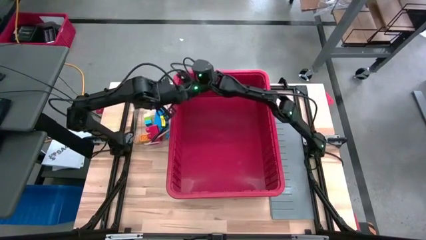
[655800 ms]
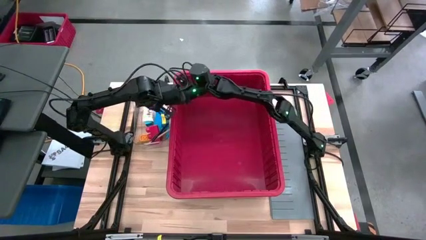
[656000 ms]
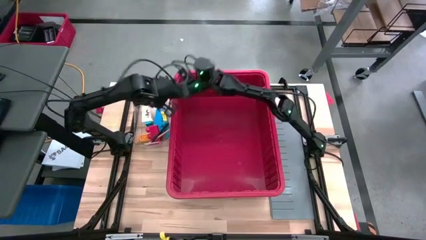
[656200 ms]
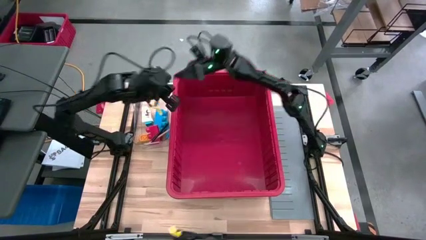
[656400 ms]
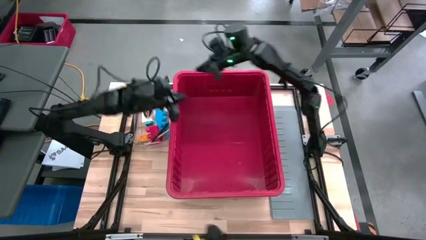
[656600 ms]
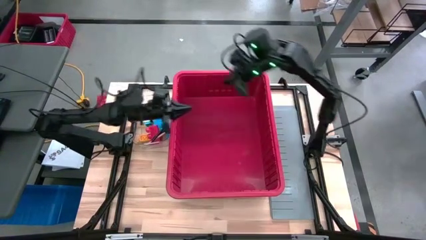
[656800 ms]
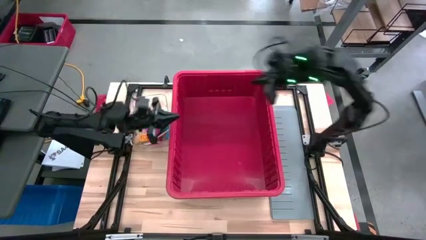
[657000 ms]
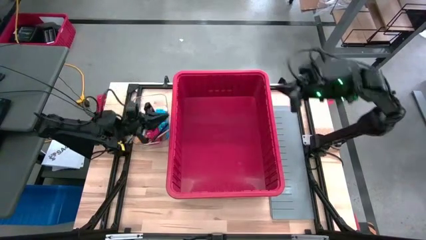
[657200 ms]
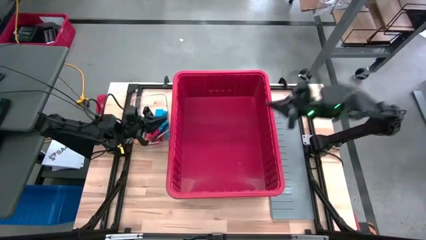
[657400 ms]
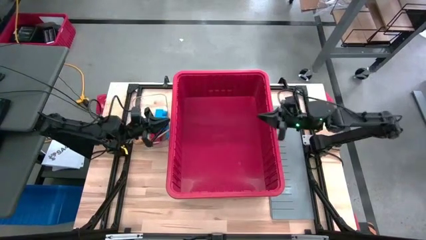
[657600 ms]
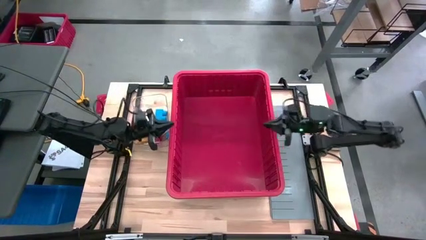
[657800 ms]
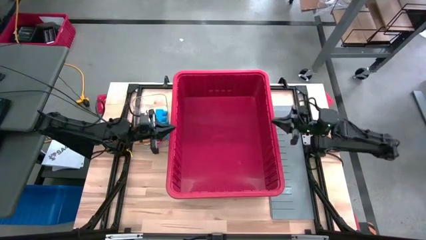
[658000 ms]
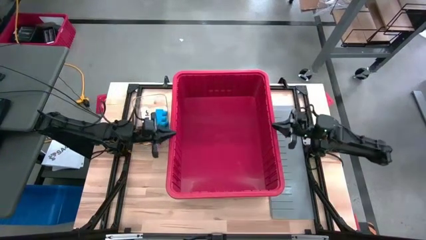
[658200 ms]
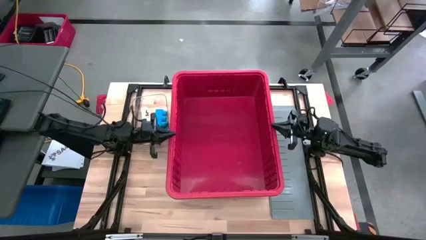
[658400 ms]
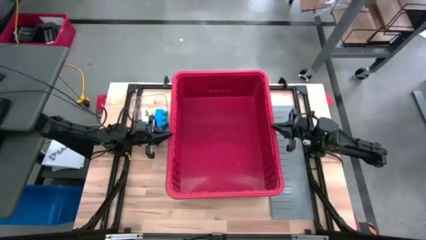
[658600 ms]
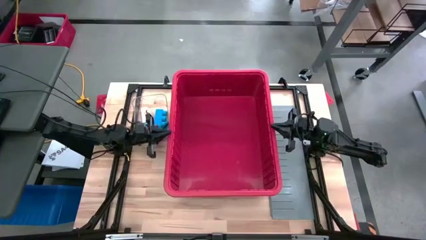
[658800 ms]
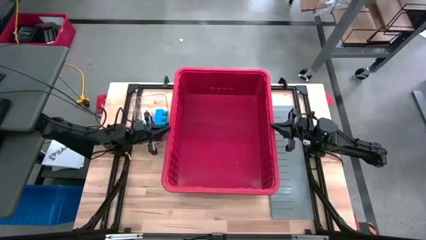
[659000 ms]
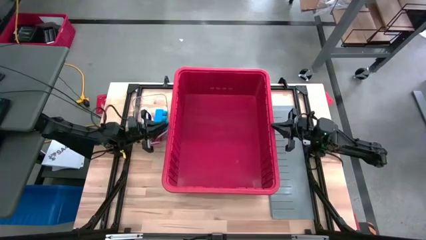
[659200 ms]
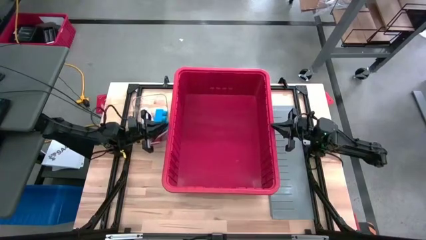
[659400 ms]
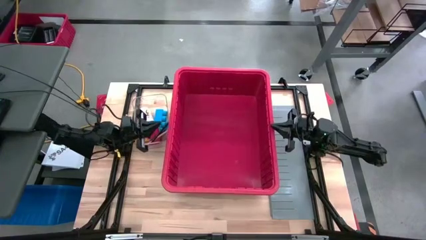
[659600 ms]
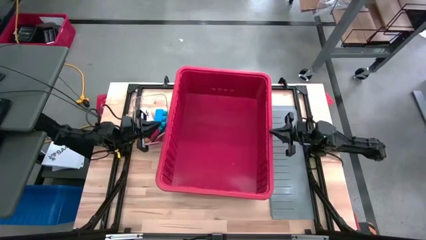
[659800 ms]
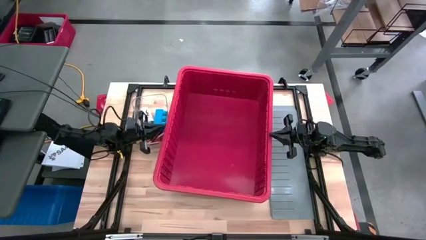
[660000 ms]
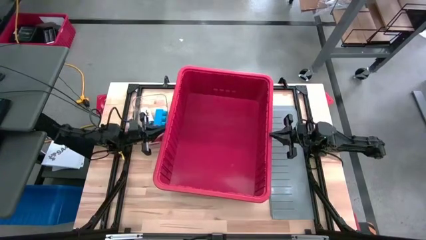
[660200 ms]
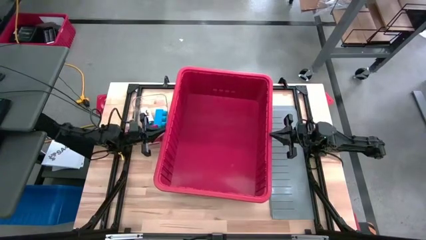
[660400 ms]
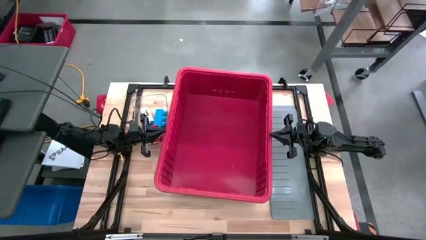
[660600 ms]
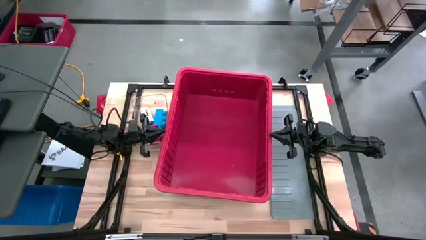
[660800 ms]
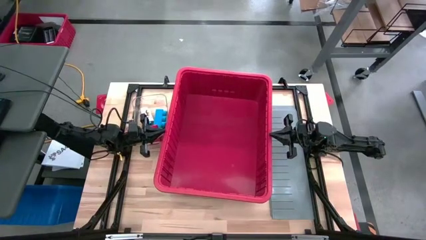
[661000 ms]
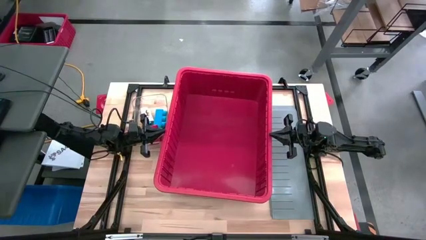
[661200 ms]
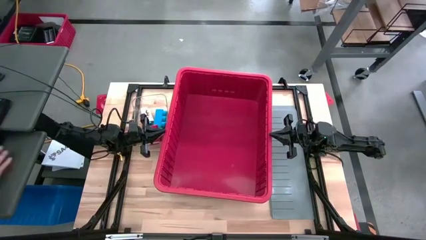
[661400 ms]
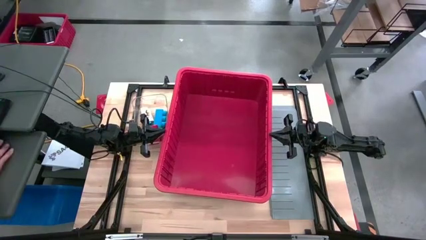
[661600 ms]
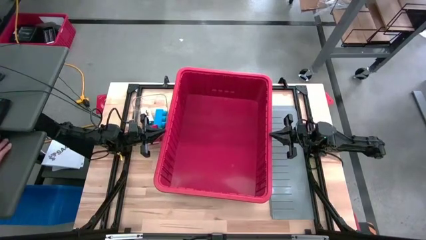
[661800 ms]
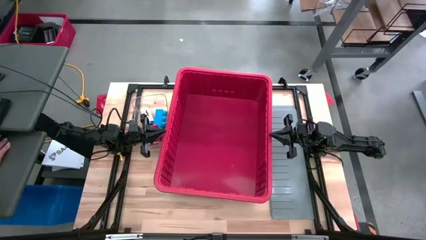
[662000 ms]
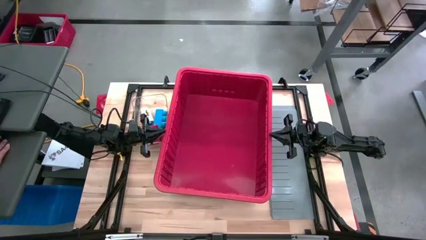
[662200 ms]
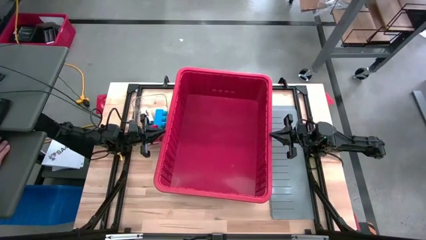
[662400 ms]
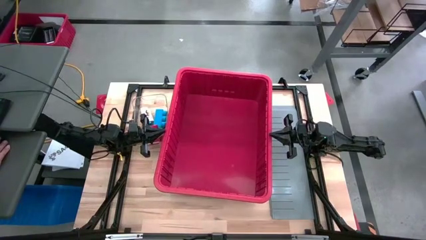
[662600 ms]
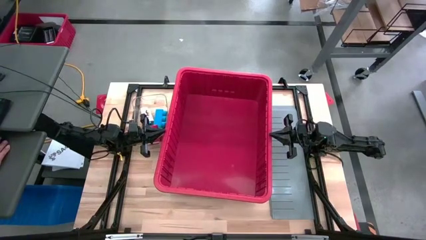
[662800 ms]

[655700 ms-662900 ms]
Task: Sort blocks
Return to Home Position

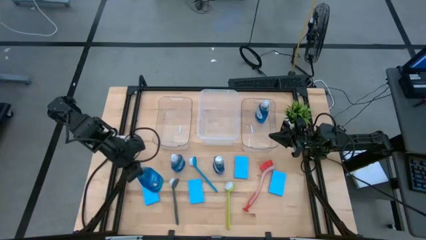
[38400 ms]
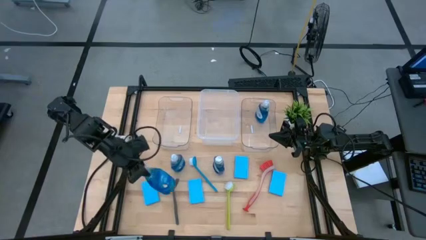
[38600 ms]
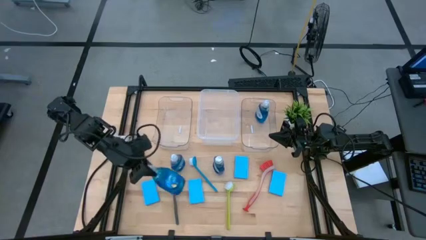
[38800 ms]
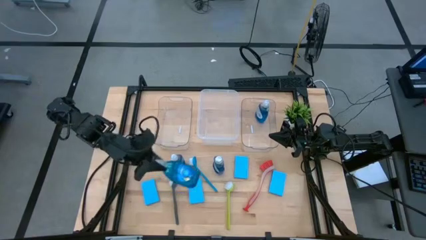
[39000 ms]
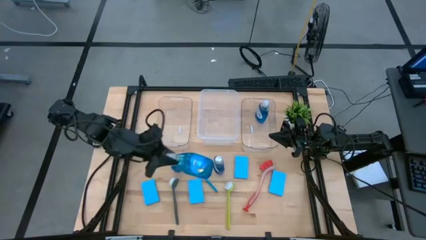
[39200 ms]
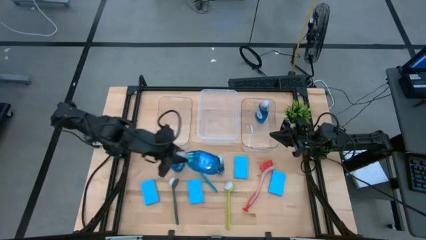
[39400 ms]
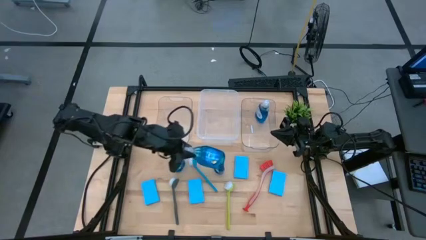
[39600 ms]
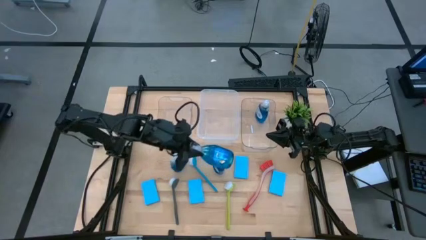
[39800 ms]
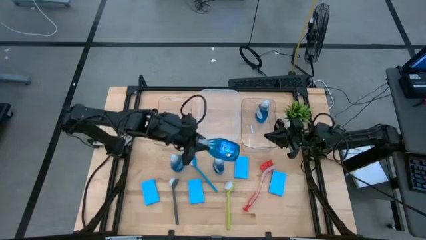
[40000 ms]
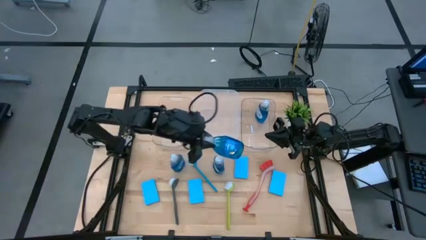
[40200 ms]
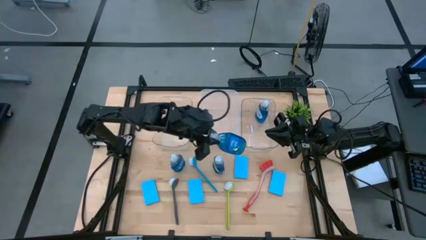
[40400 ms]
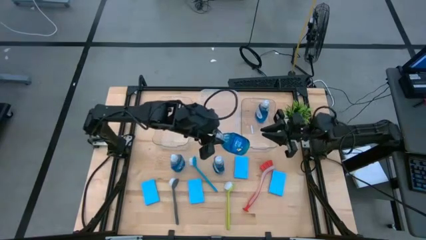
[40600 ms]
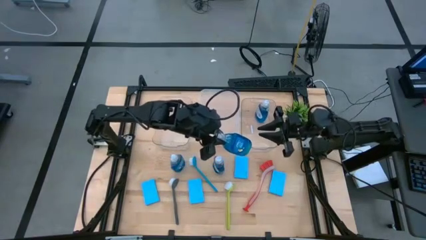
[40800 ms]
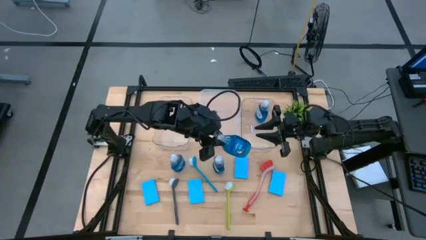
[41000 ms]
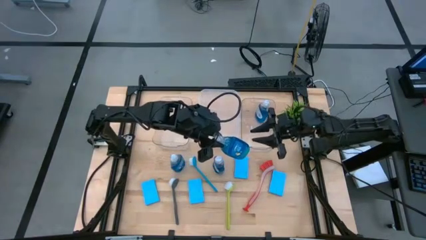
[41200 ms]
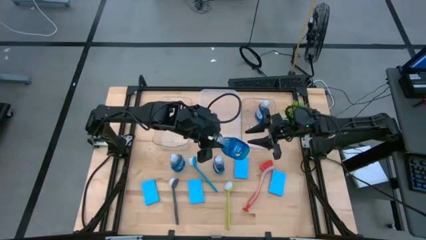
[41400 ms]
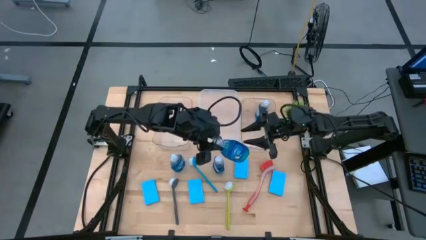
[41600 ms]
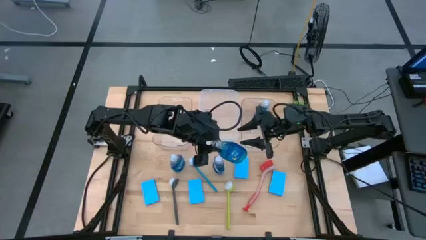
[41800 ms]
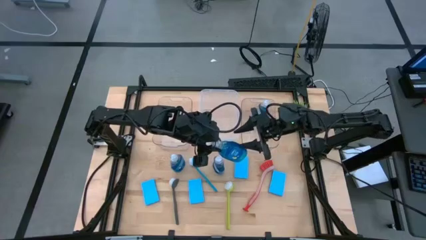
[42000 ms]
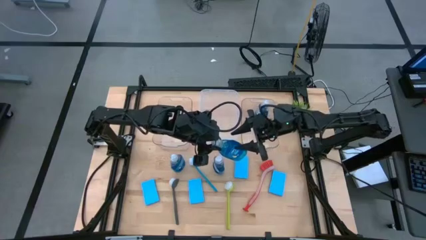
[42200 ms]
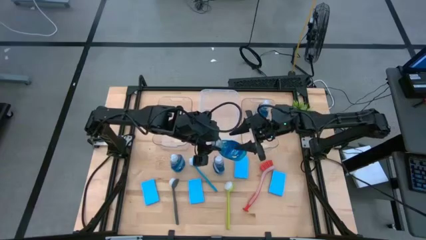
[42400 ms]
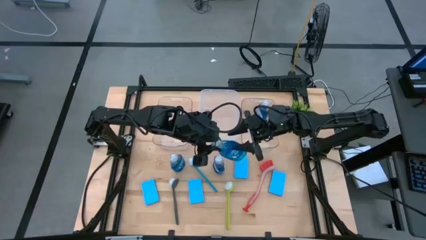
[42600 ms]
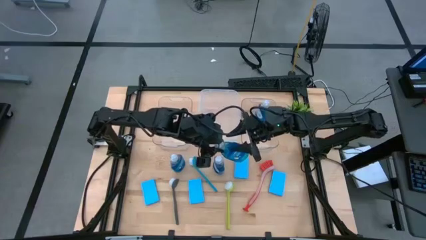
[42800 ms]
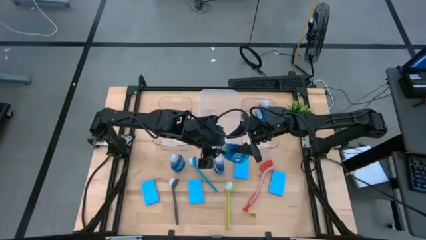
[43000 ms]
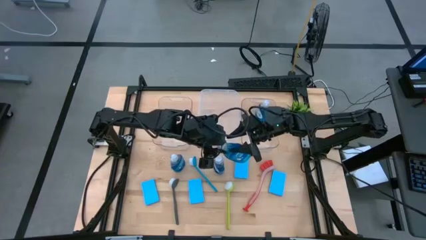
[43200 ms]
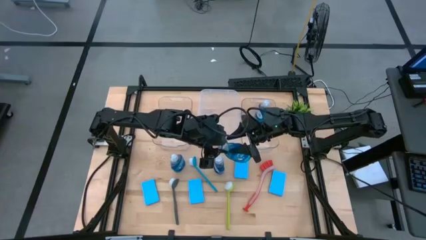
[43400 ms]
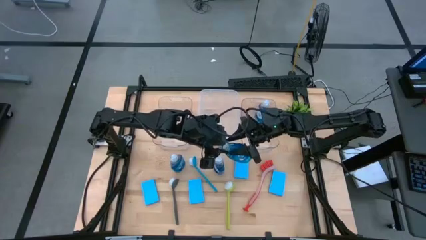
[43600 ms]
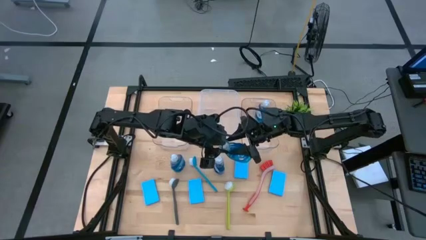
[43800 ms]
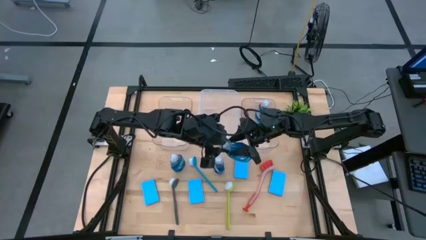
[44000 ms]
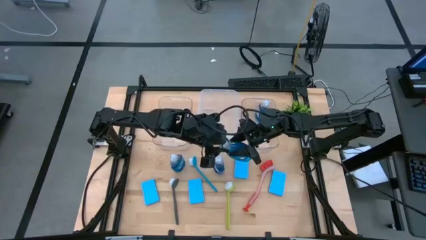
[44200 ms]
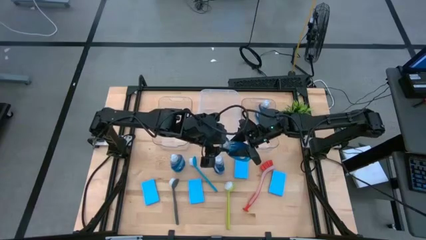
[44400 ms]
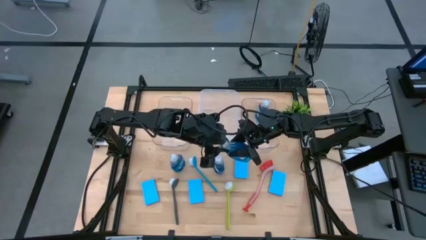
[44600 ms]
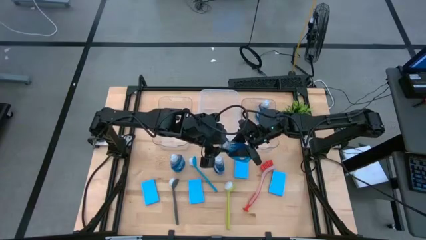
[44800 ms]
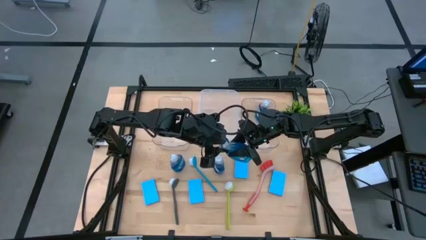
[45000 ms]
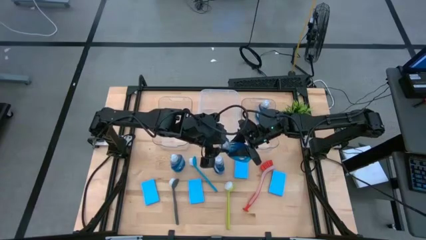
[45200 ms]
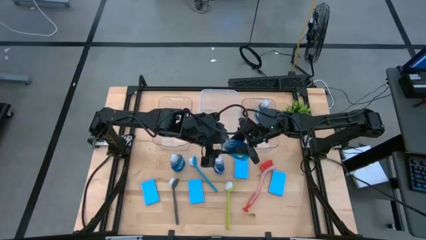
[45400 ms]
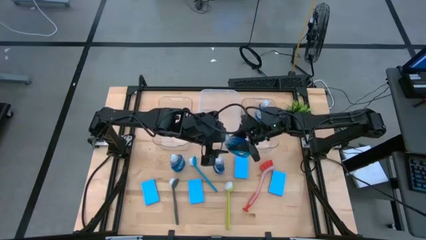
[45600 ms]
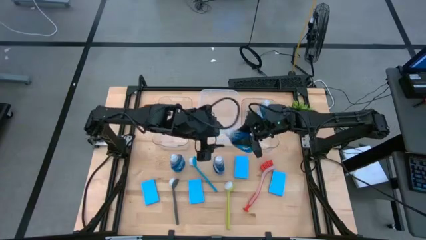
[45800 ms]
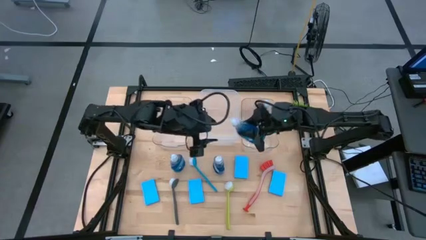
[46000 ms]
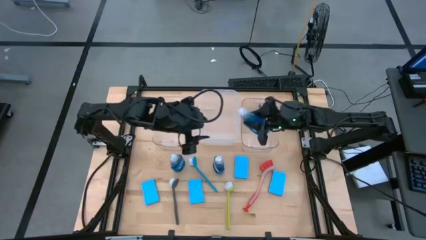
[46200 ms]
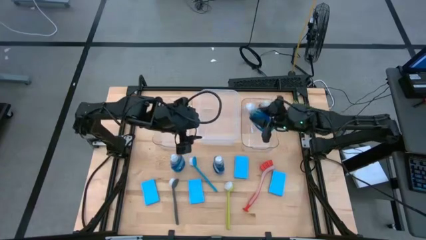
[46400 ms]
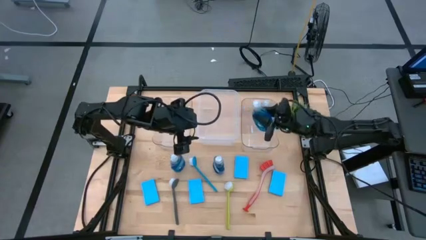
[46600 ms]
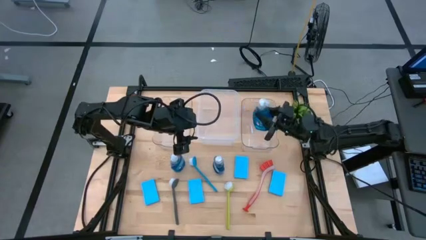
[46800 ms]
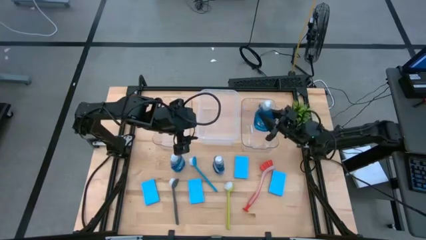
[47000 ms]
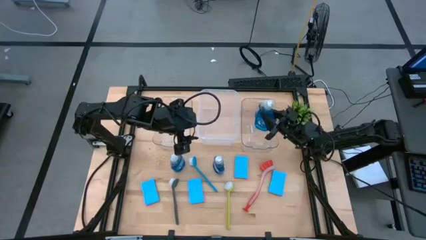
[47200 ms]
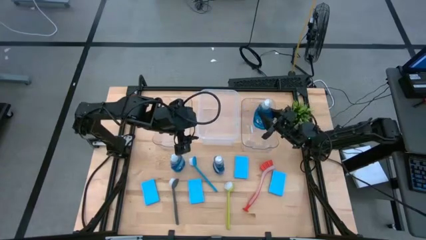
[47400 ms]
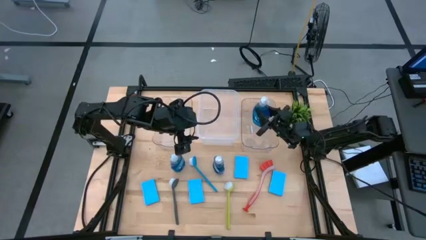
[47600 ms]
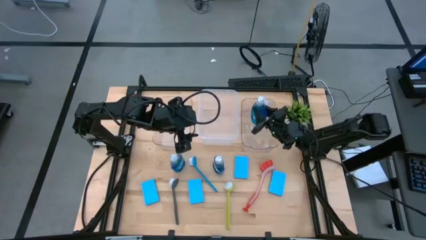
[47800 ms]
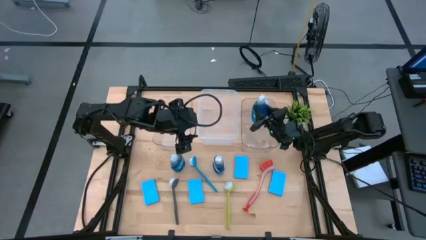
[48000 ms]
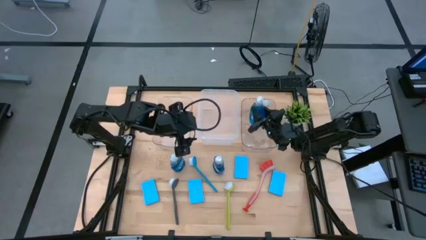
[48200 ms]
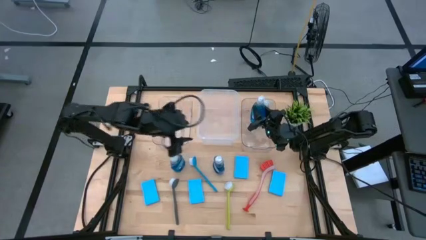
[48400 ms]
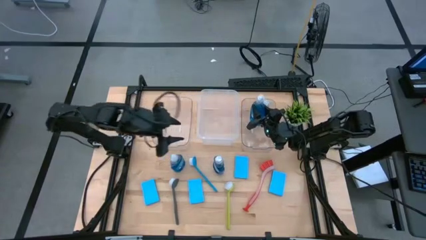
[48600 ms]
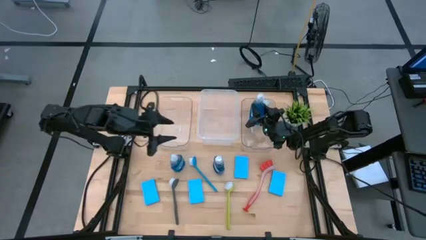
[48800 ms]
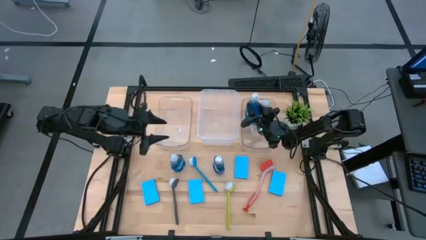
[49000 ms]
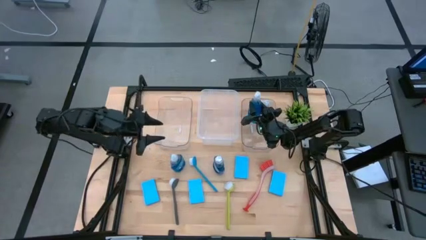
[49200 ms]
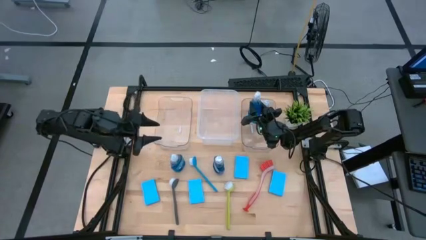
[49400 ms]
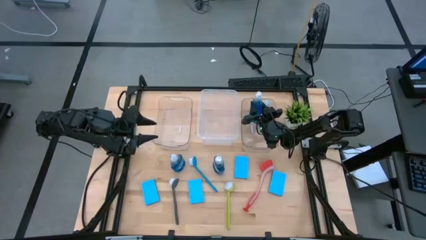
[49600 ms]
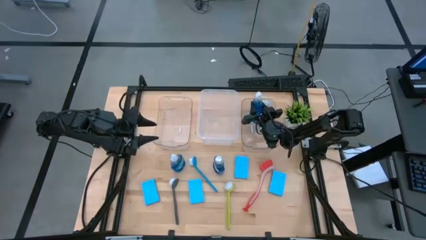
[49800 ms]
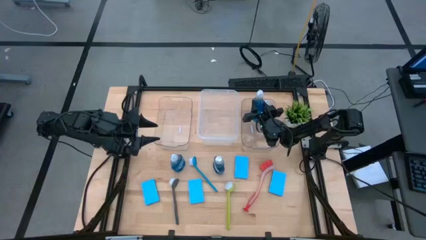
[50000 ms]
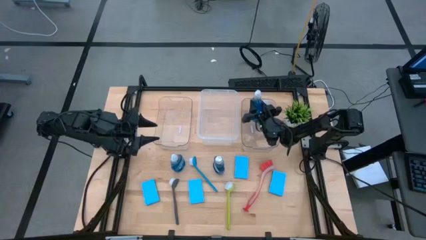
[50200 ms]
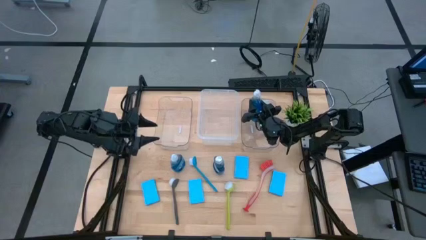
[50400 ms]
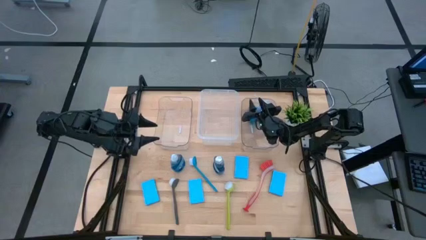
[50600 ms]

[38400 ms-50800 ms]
Task: Pick & Place Kitchen Sink Supplies
Put the blue dishwashing liquid into the right transparent bin
